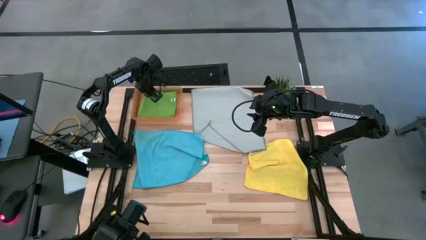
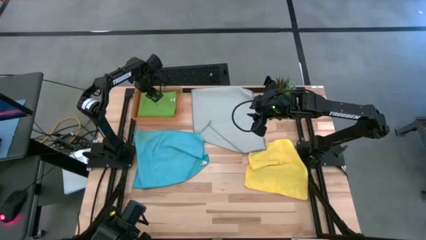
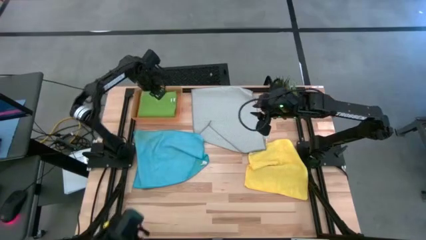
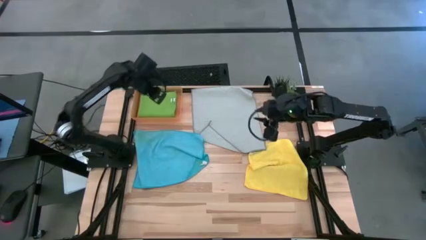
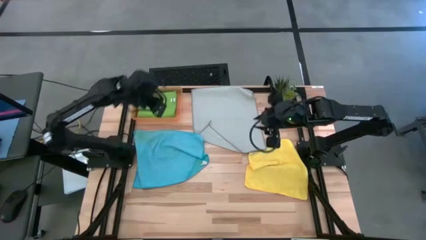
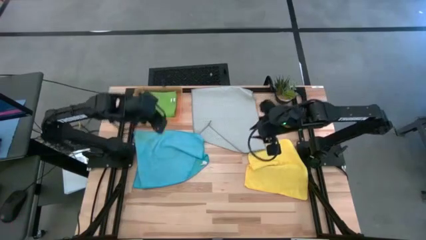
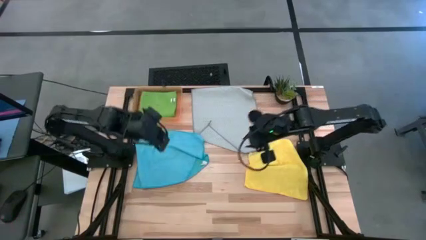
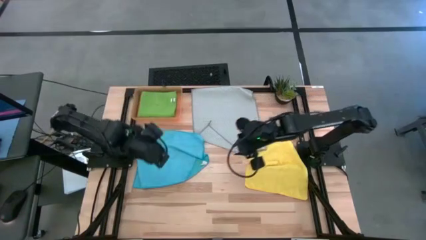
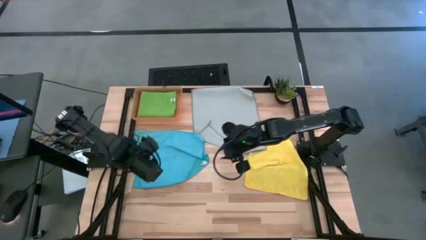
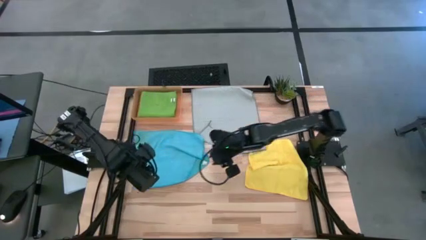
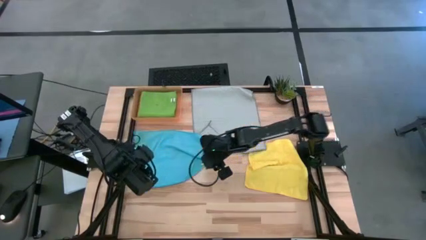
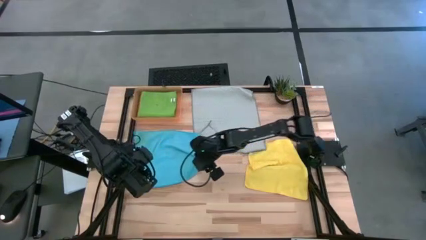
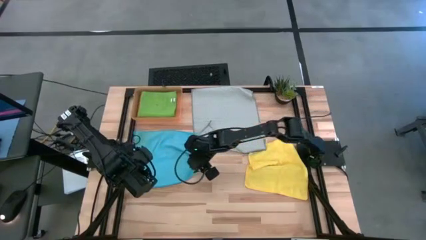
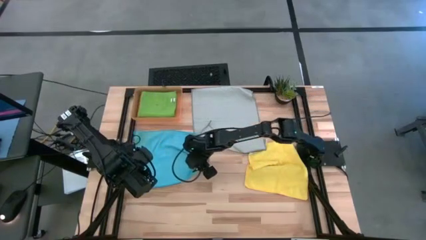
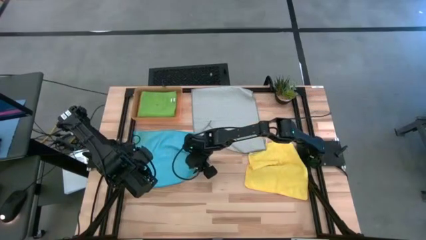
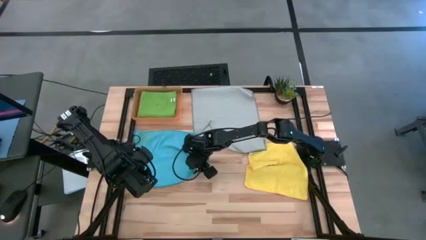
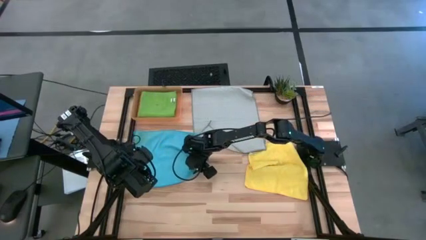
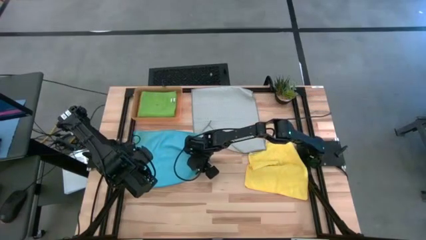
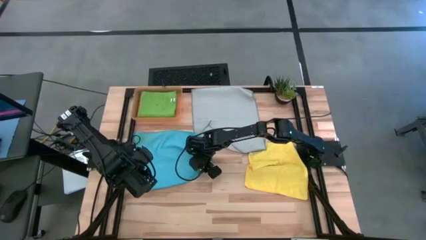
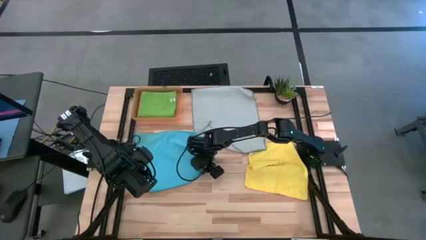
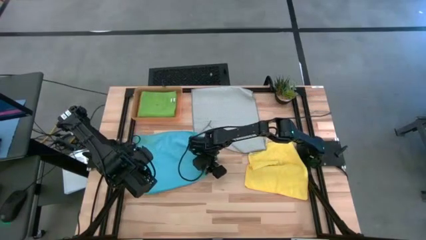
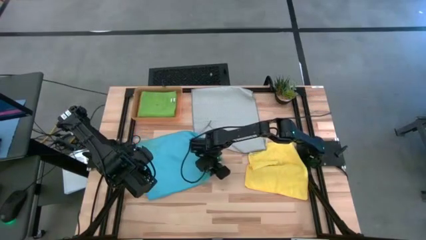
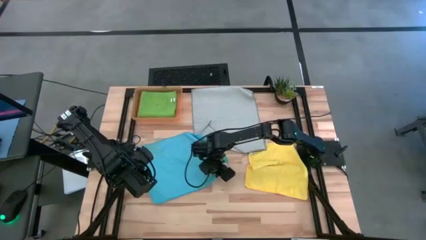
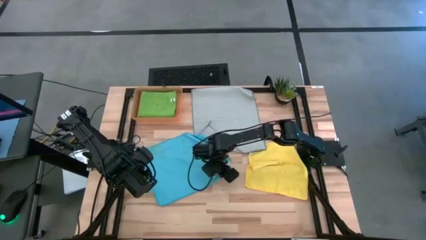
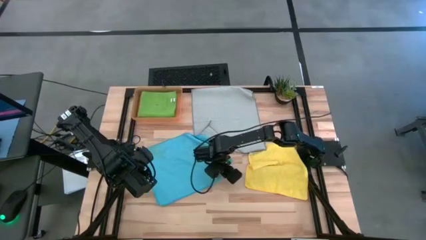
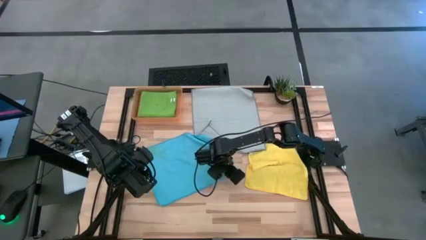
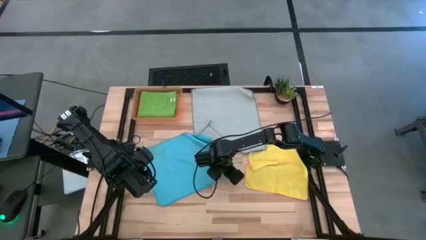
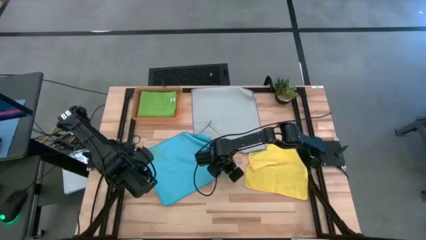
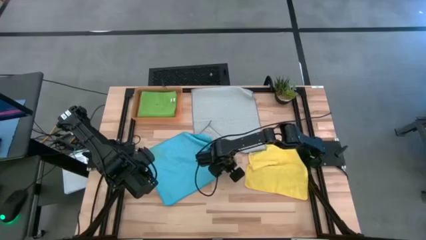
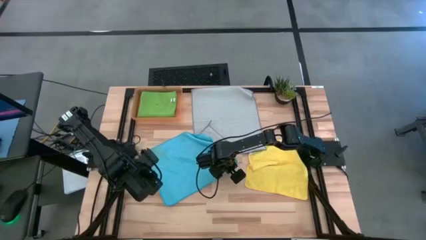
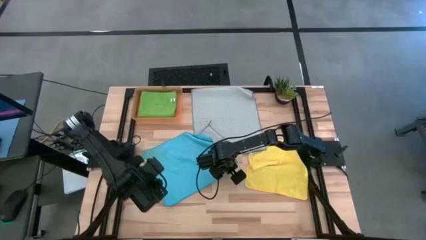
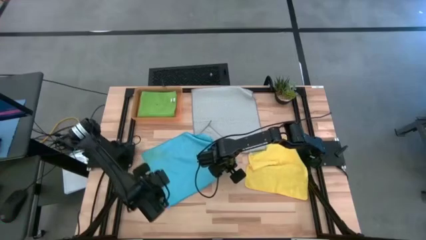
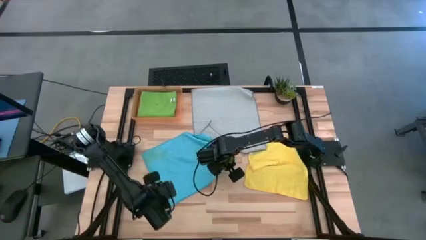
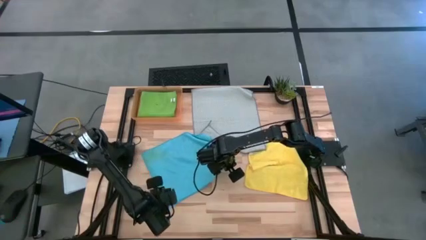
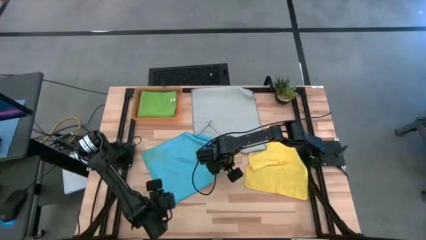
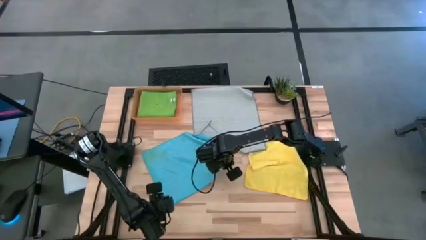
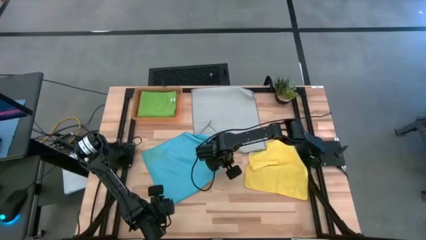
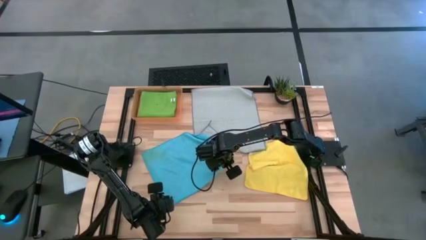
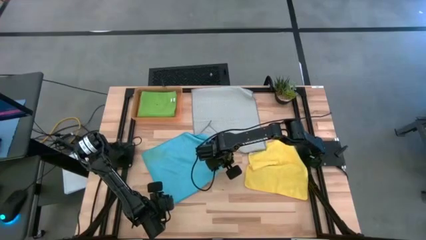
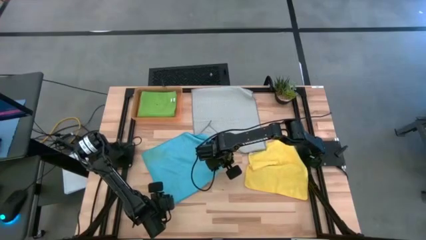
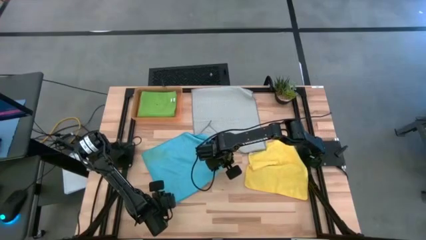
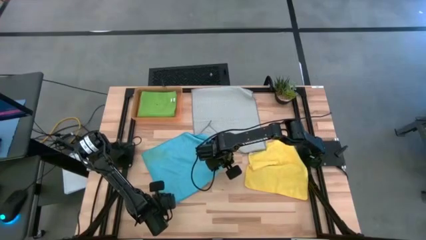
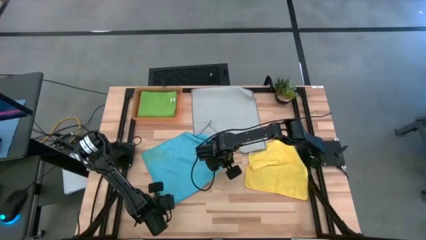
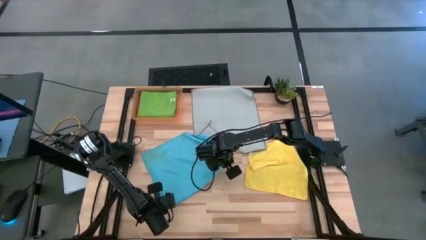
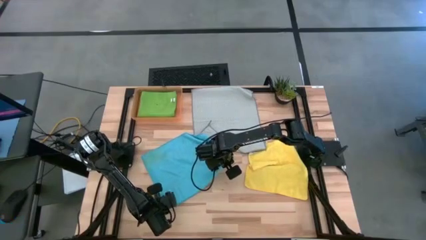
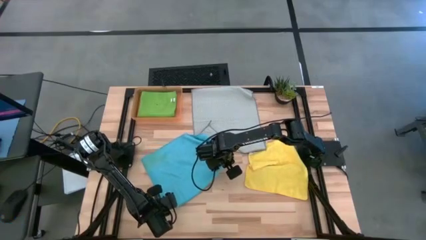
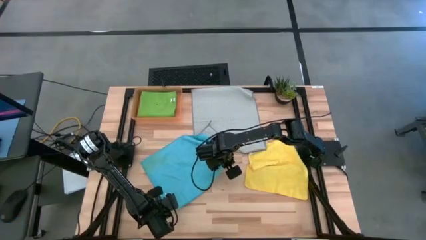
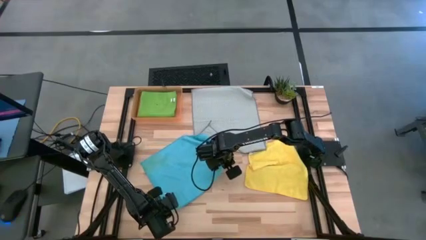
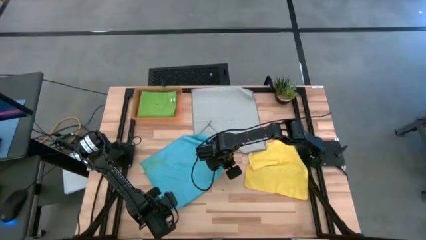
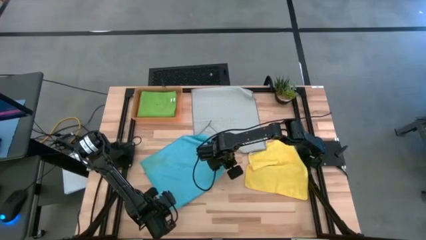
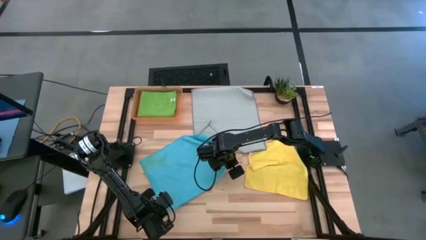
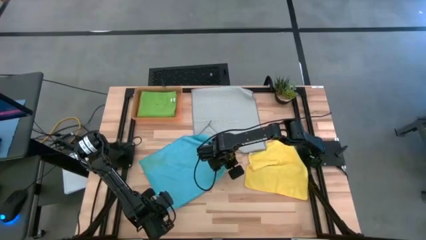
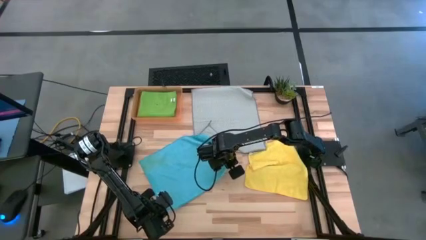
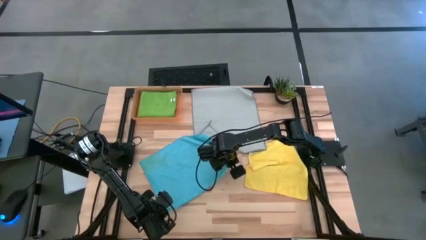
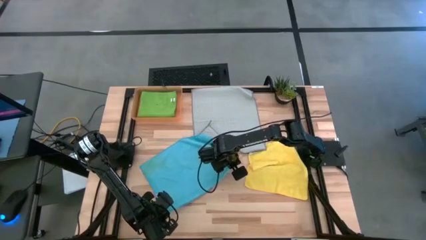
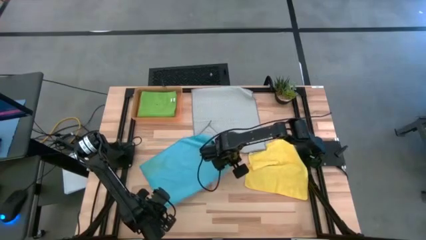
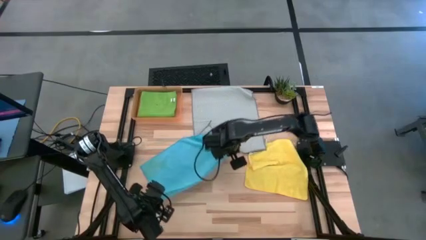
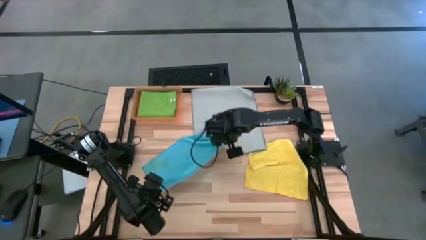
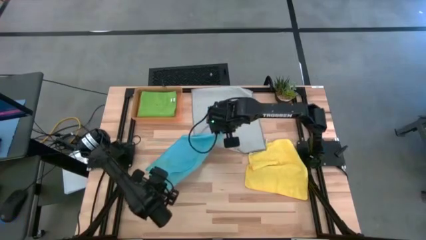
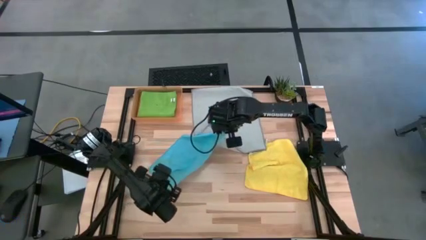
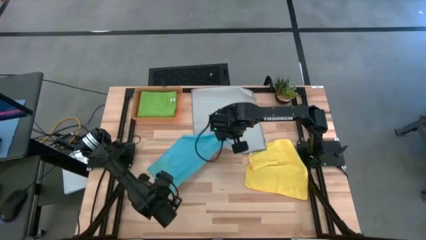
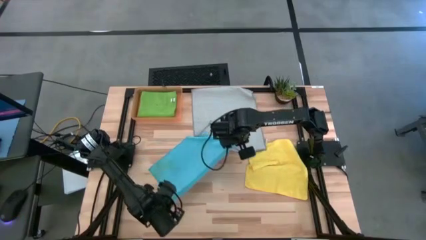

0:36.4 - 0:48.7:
Task: Fold microfiber towels
Fold the blue microfiber towel

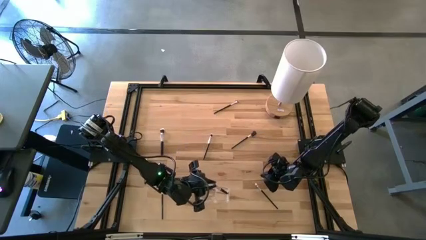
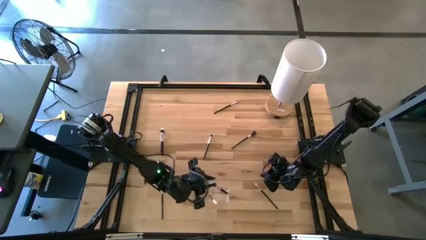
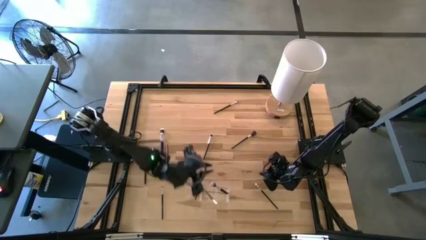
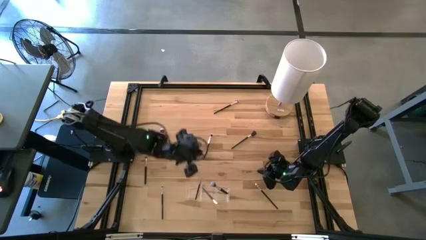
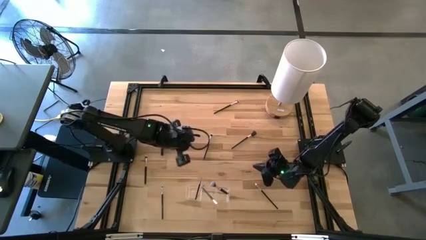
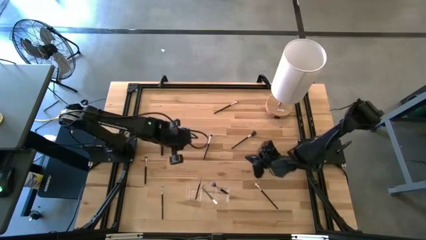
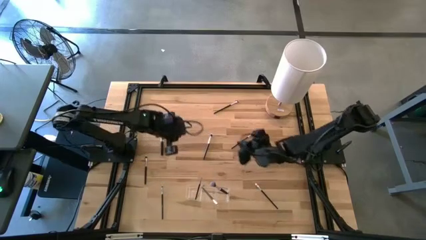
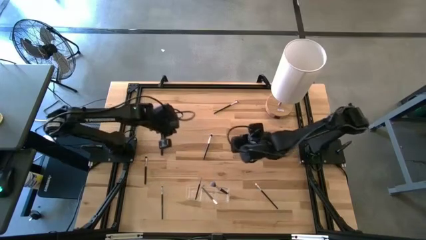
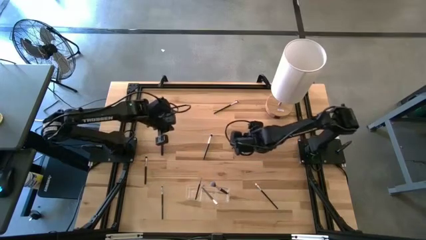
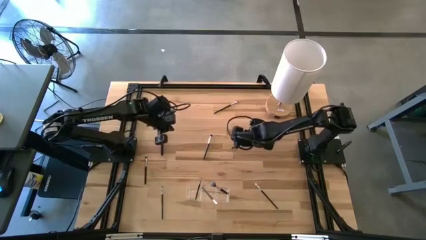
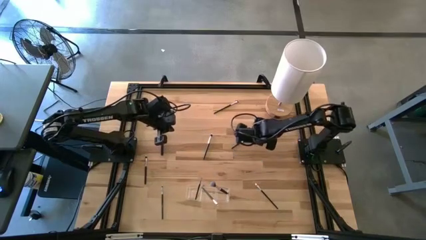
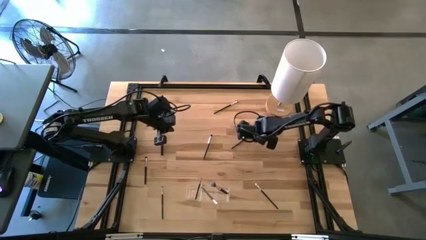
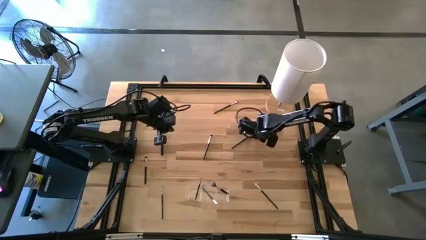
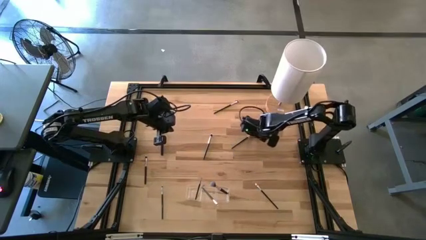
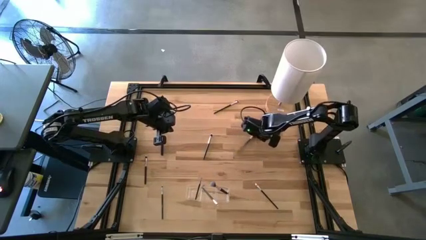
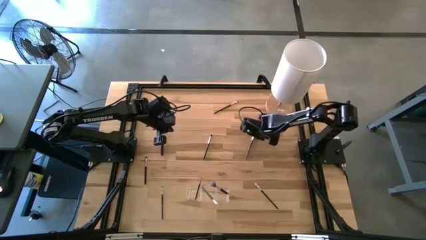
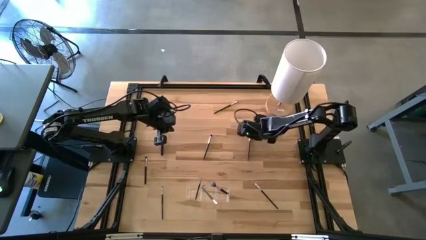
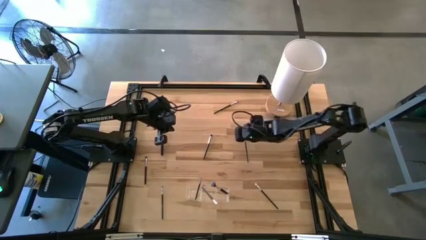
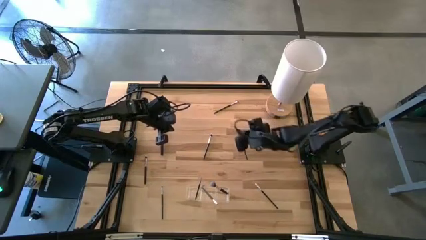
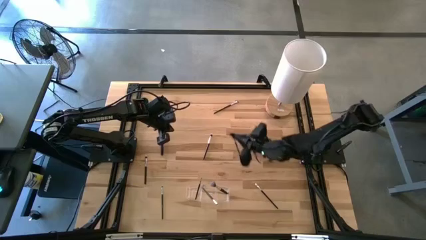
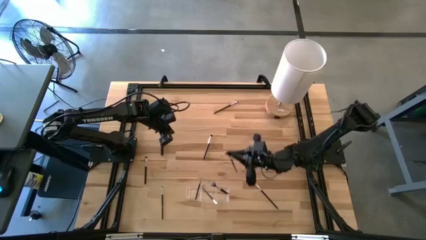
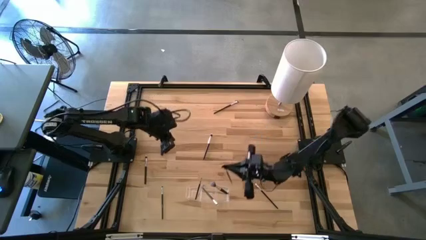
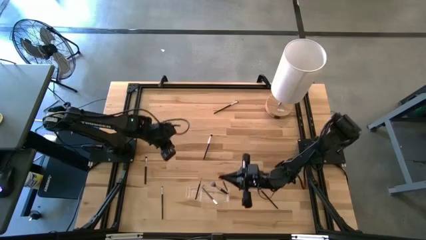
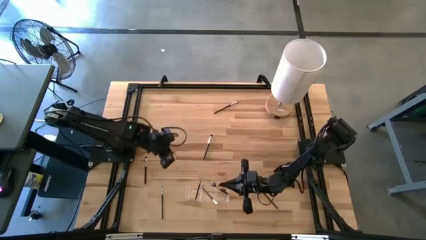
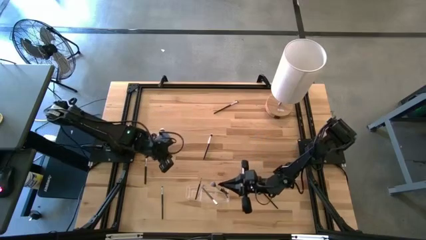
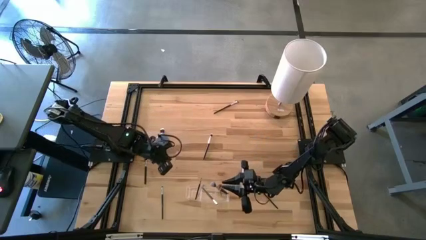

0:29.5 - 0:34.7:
Task: Put items in baskets/containers
Put the black brow brush into the transparent organizer
